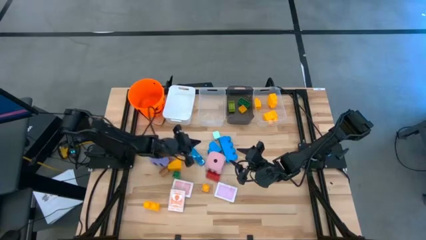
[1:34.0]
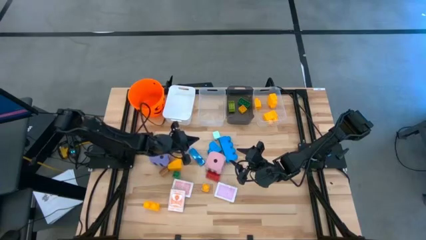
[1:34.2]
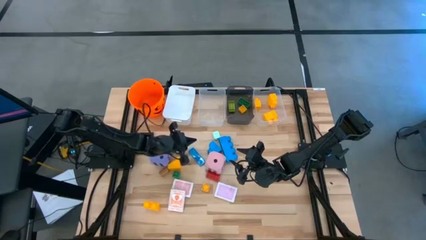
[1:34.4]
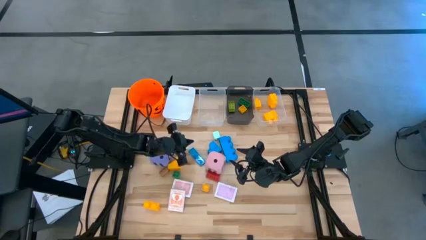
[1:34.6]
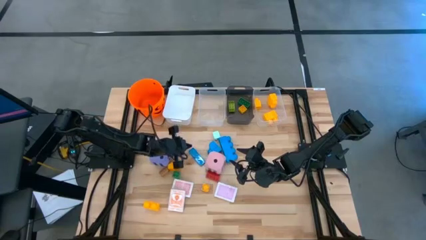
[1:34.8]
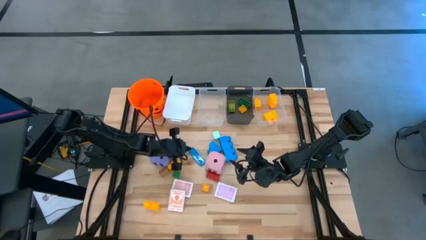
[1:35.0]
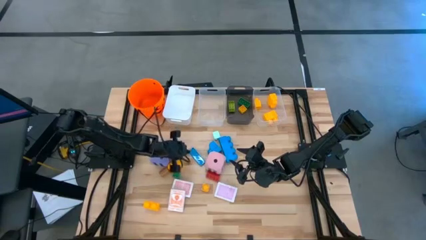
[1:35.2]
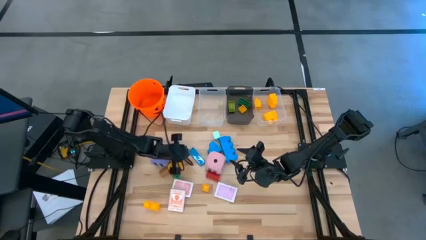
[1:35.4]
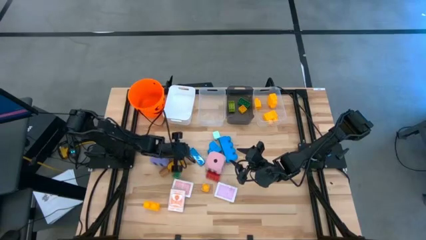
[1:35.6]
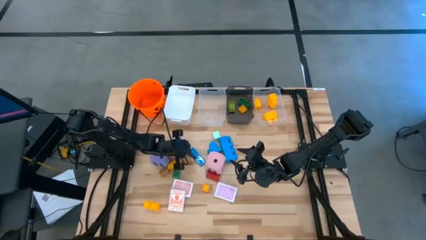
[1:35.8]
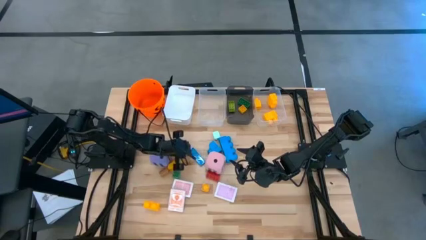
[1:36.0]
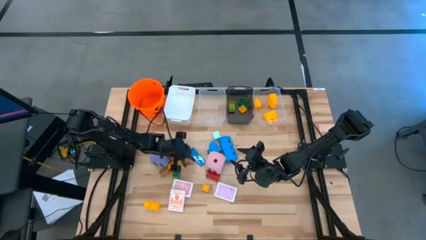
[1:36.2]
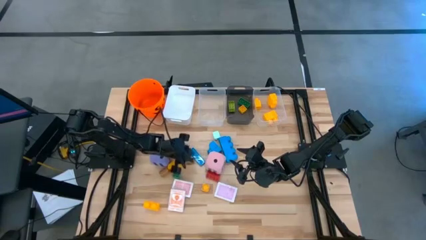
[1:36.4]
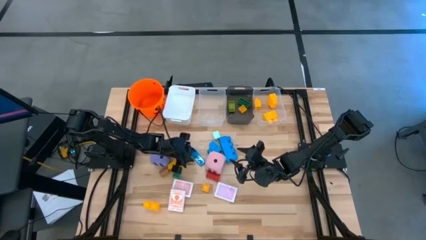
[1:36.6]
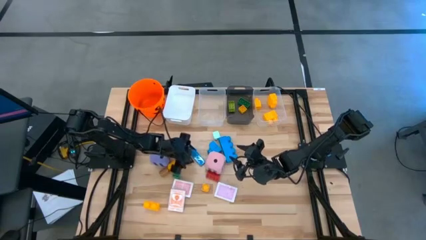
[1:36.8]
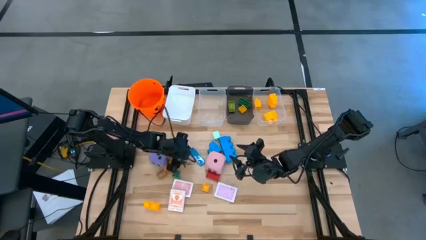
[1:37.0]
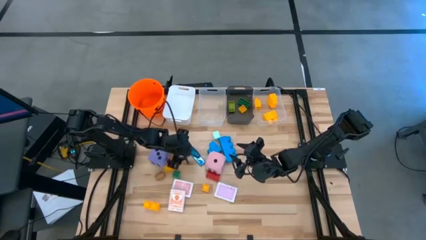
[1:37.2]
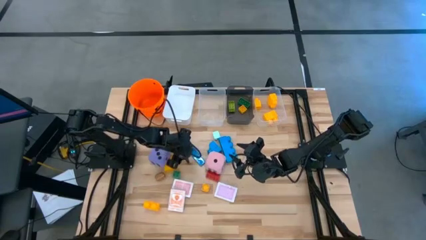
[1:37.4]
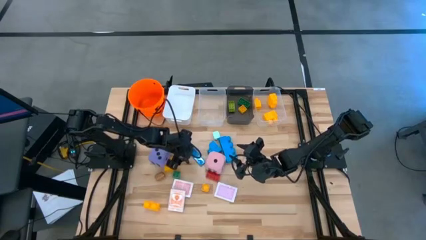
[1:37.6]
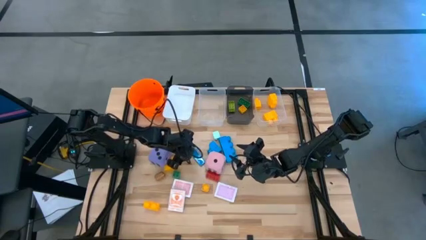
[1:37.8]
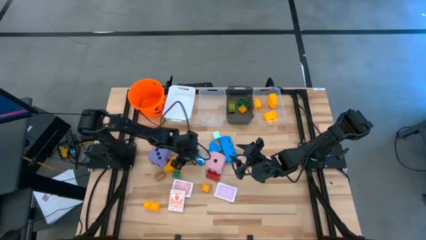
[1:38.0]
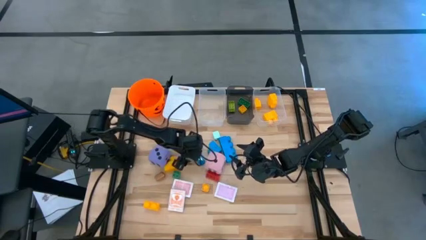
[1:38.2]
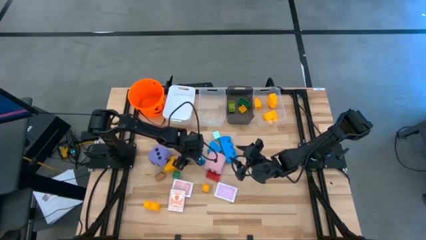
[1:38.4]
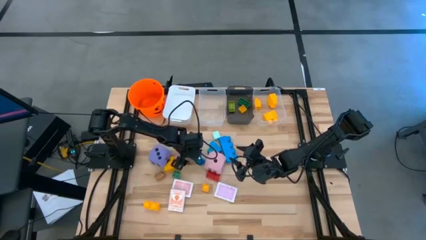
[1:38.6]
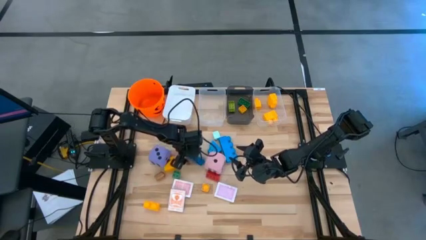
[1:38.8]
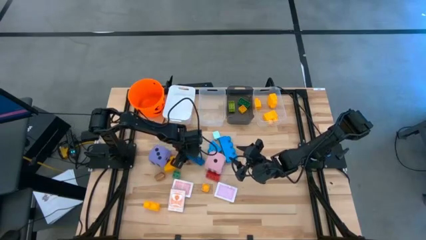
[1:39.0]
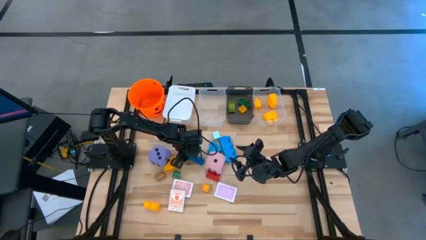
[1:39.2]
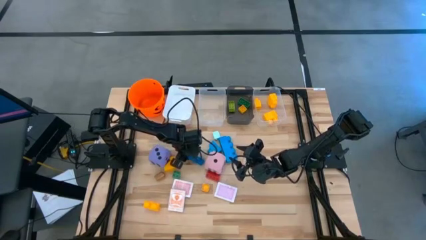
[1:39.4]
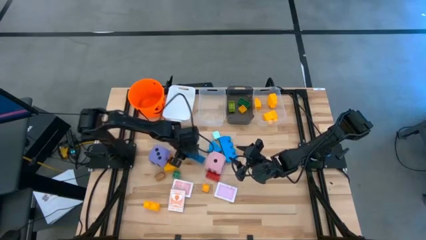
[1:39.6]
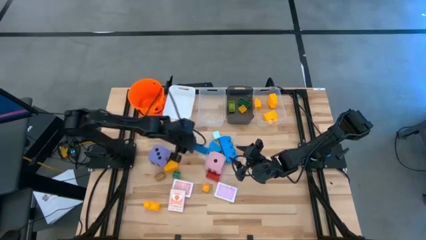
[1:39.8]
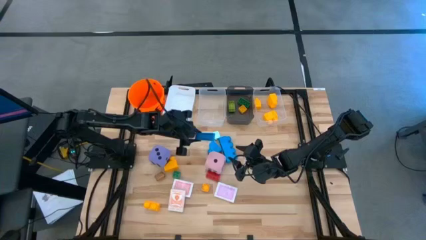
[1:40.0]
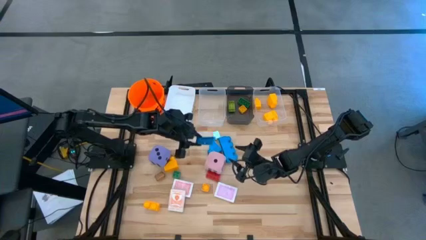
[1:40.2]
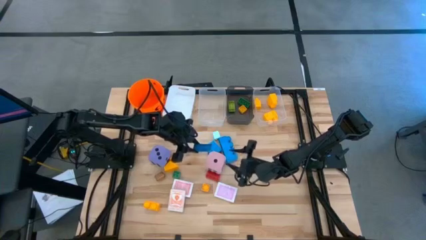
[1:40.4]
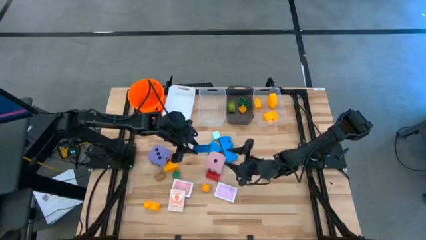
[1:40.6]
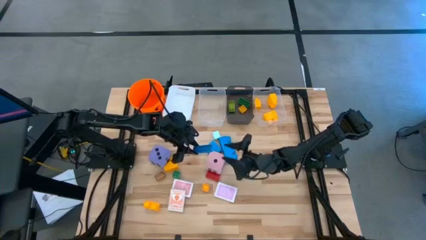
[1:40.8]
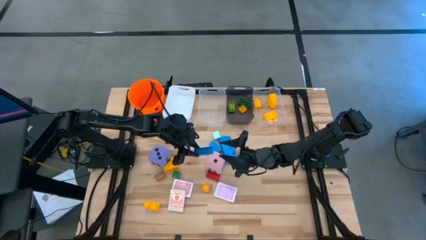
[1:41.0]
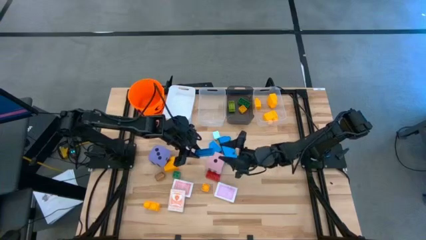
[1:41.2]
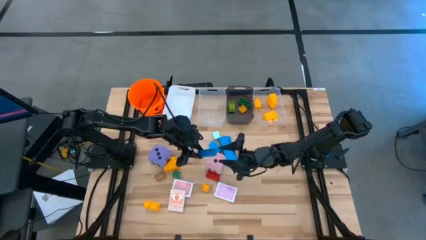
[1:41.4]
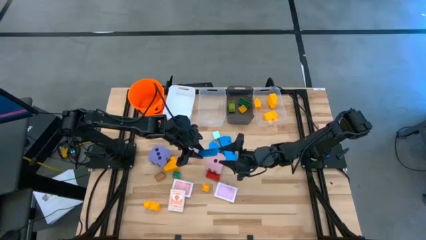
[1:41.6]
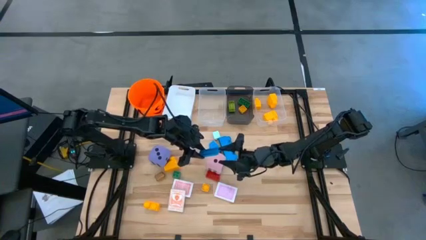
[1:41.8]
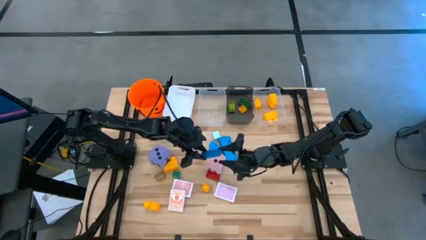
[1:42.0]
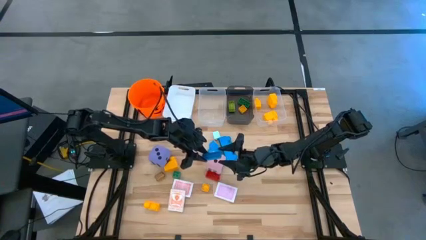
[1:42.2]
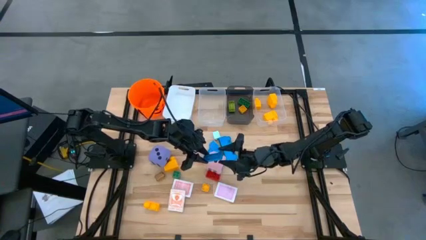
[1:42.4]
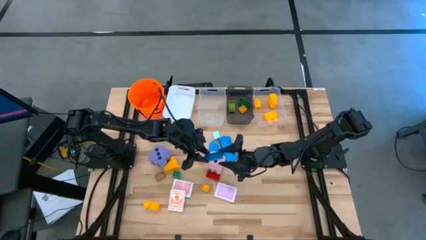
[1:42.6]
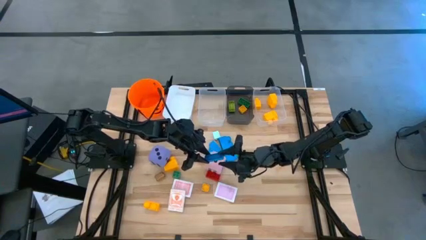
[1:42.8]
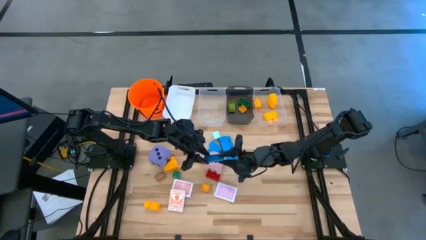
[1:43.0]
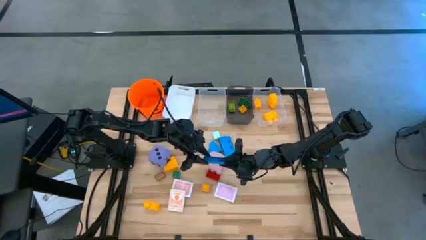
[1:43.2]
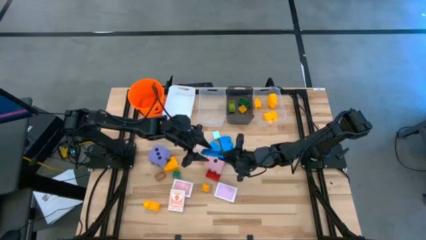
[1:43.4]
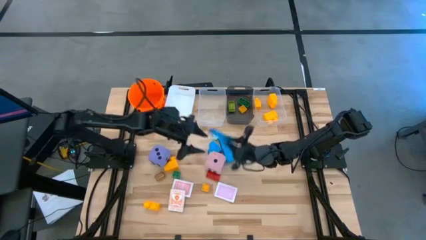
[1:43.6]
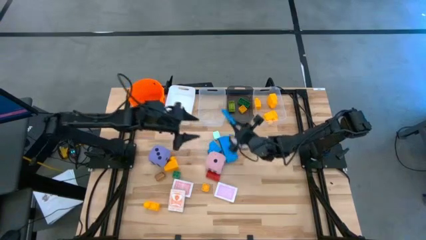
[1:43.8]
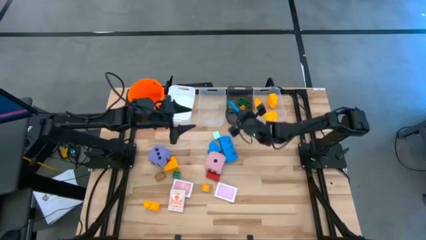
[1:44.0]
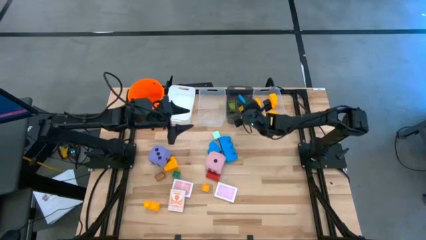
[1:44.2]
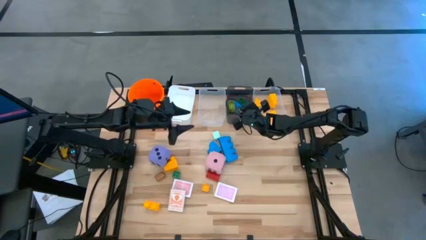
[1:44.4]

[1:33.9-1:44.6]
Task: Pick & Place Toys
Put the small blue game piece into the black bin

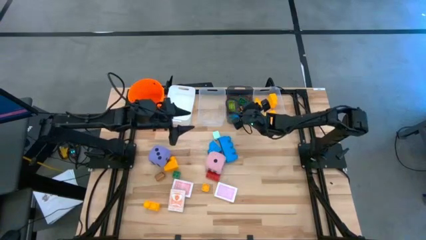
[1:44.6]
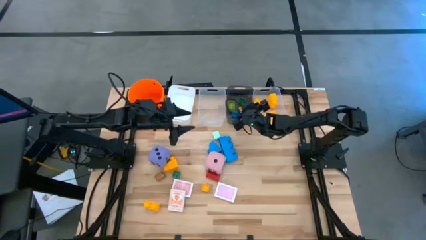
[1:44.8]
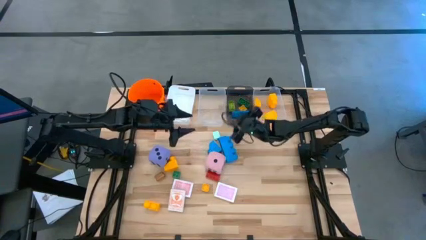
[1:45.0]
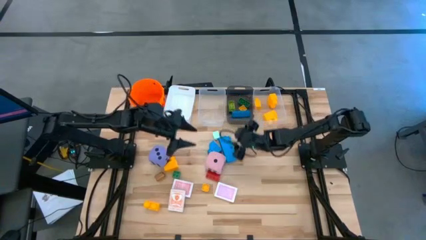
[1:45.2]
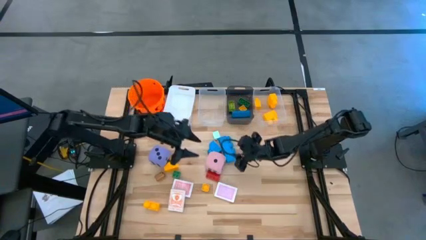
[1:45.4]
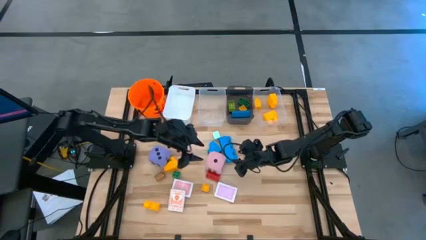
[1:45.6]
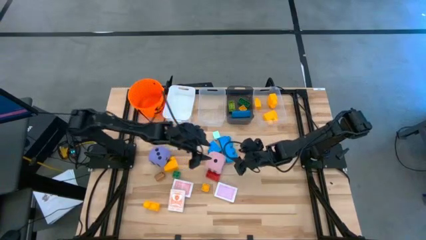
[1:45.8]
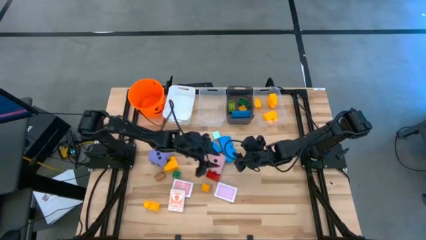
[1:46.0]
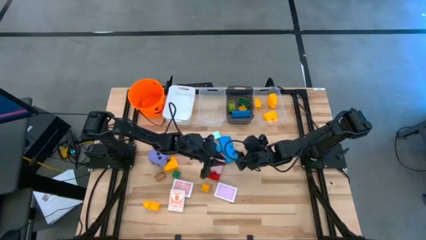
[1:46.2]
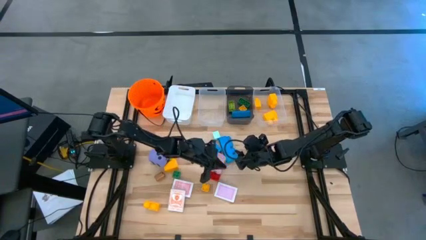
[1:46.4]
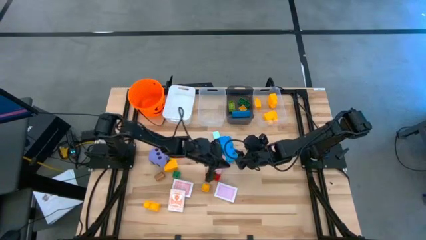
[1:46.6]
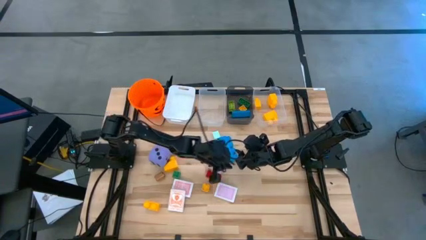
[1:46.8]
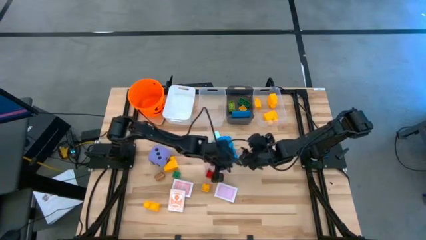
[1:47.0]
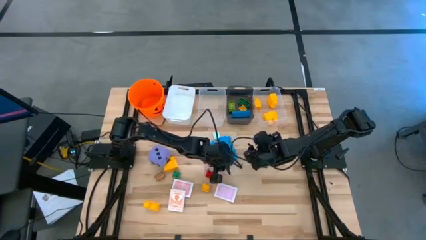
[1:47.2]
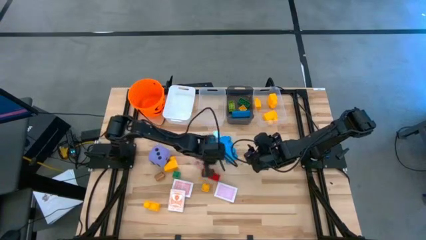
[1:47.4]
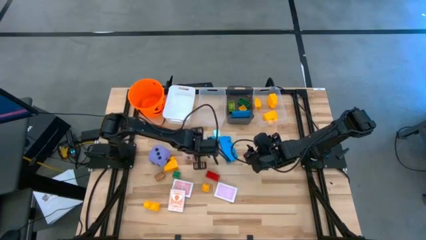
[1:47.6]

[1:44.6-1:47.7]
Adjust the pink die on the table
